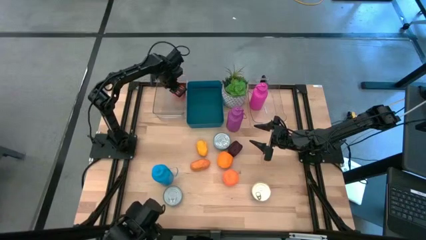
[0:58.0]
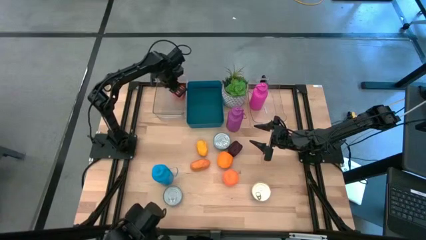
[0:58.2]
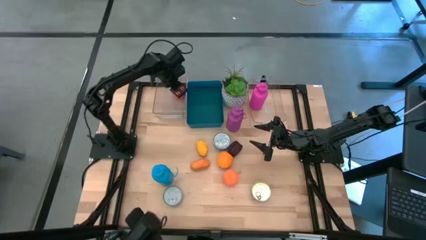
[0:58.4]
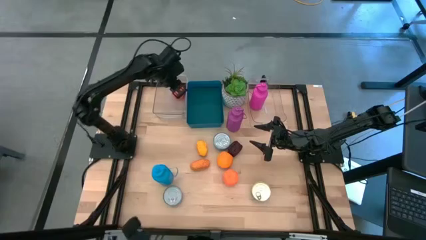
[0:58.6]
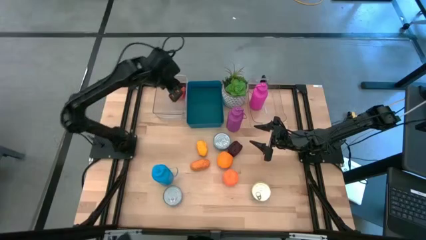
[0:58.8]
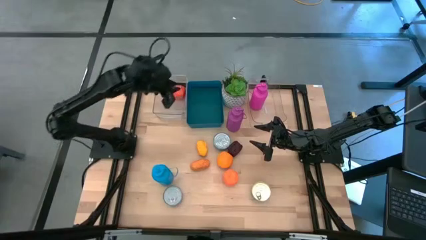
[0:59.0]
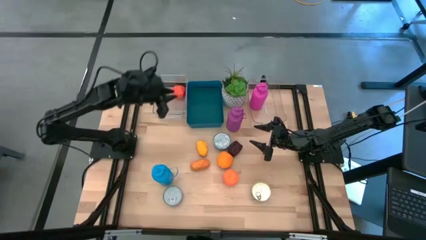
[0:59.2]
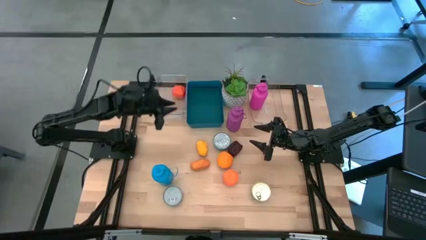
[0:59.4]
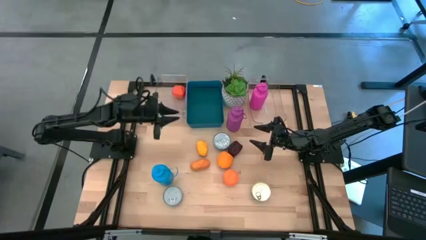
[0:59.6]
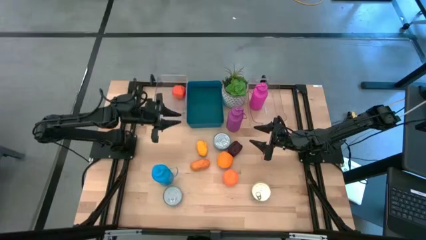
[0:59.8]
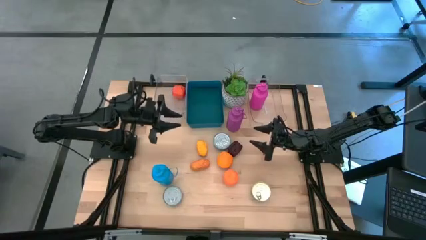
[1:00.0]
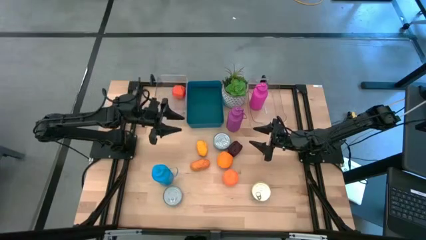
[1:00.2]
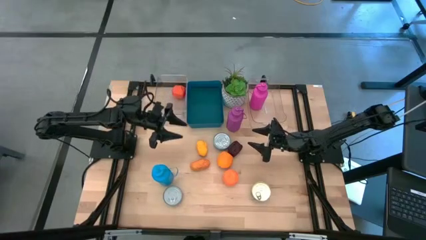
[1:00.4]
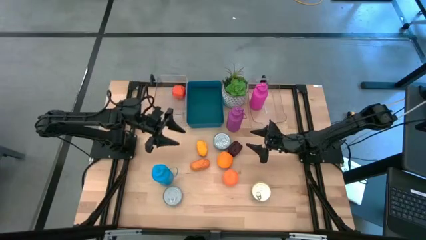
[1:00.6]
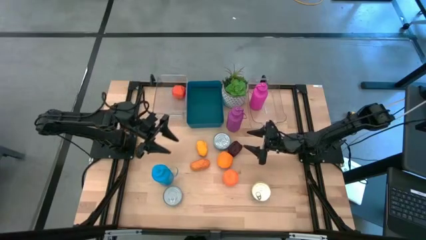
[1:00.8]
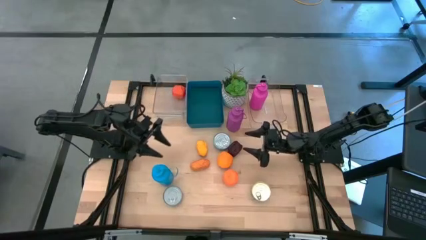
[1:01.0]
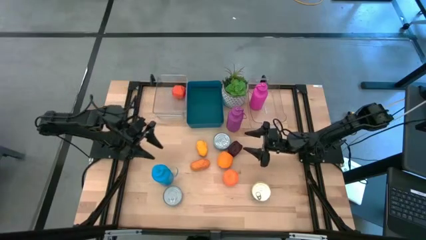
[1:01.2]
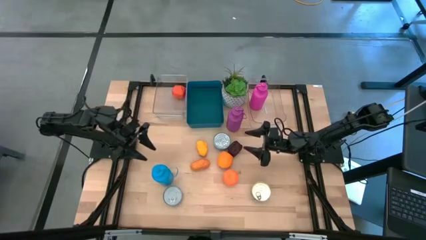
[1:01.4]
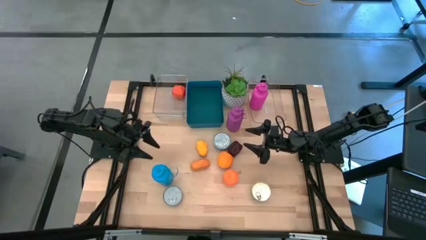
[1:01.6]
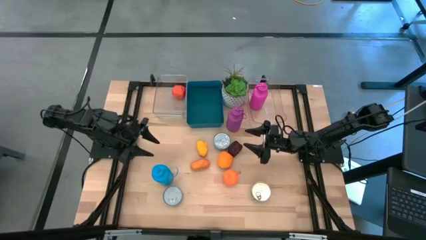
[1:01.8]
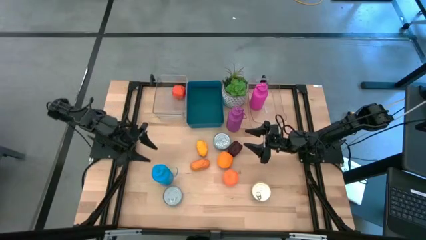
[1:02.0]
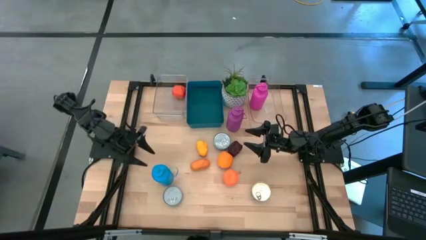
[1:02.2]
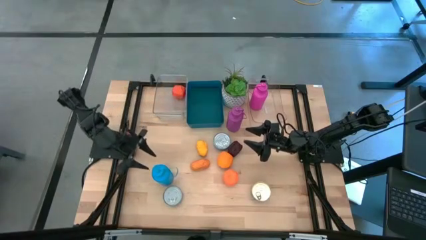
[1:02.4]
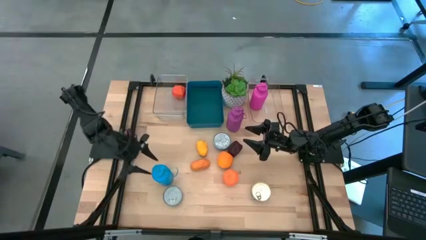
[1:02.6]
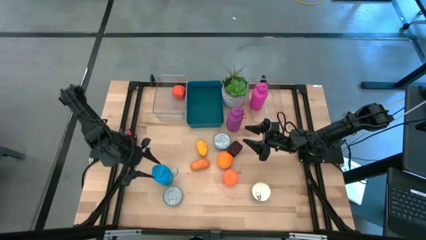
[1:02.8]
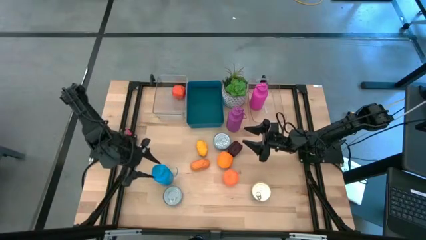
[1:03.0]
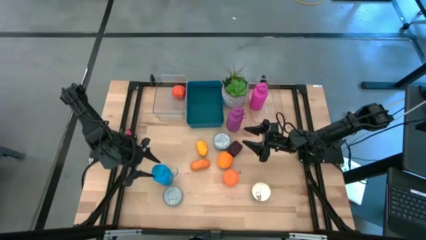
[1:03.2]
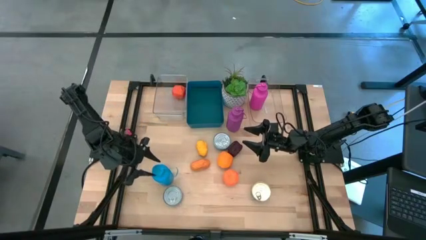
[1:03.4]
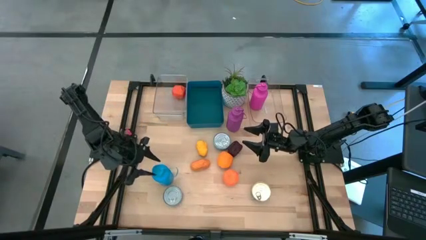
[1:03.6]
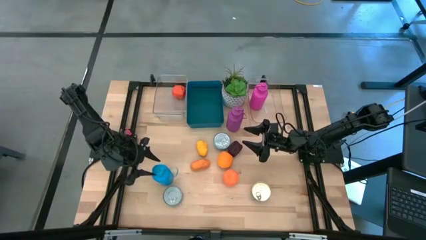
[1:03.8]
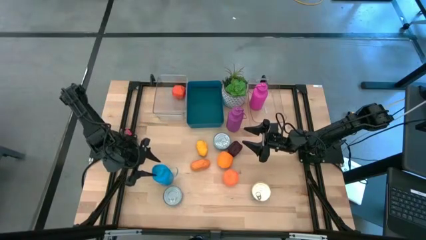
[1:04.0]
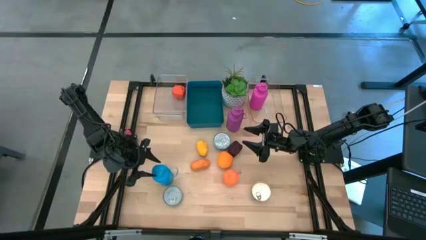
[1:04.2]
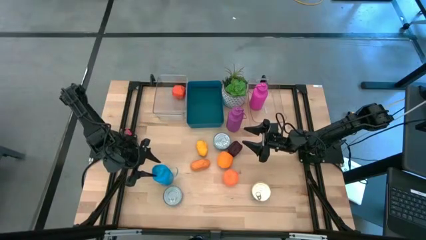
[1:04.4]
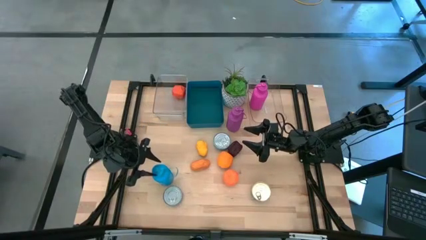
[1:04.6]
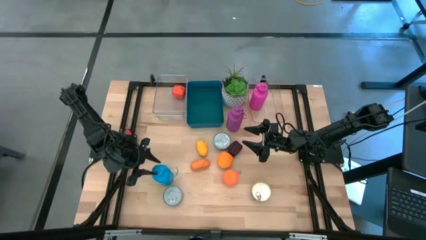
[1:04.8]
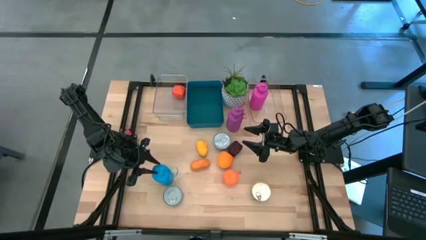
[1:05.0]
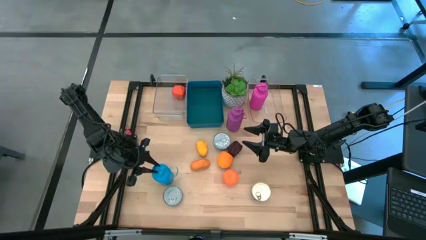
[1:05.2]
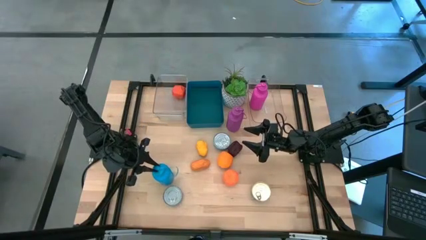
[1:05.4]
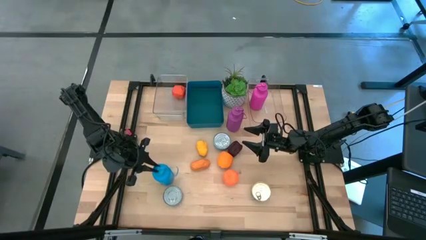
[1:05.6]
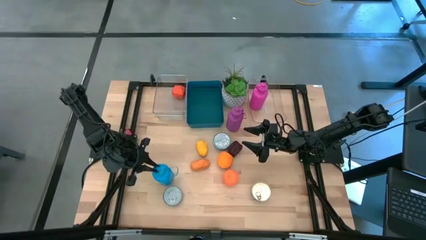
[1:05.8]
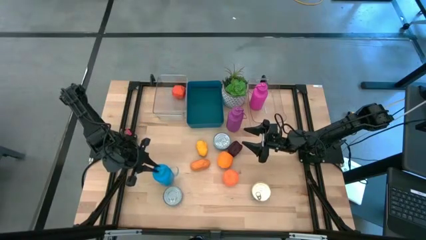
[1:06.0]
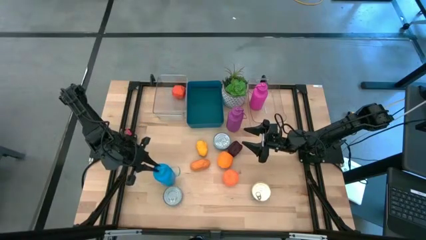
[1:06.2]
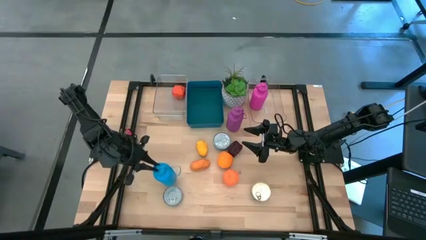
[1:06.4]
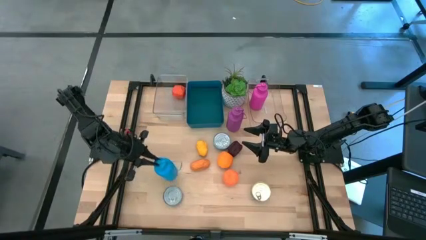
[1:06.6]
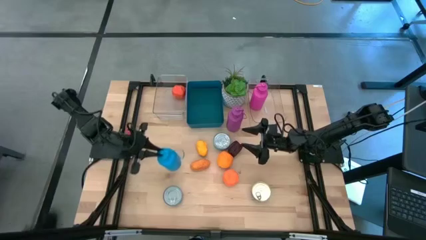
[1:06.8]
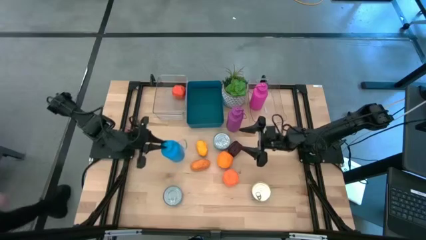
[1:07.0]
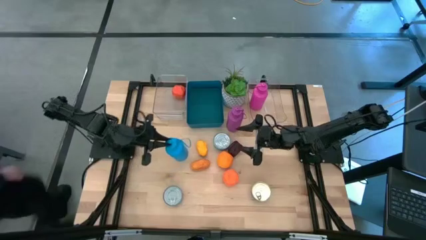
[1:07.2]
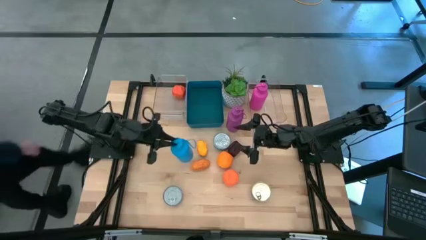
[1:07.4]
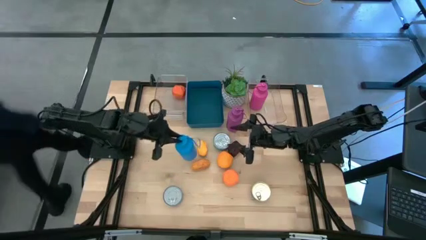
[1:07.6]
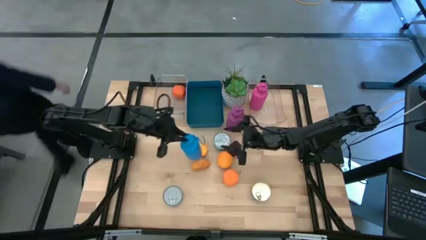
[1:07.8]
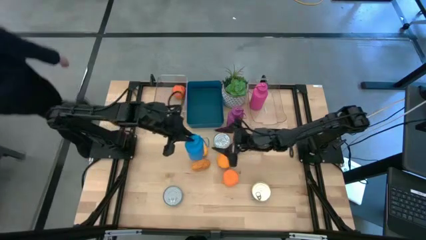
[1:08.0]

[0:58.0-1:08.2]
Task: Pick & Place Food Item
Put the blue tumbler into the right transparent bin

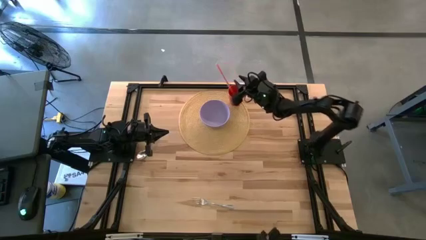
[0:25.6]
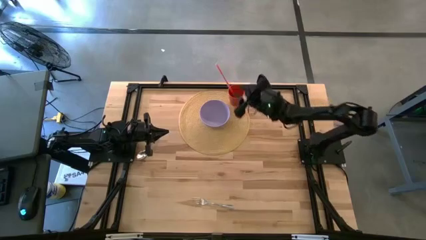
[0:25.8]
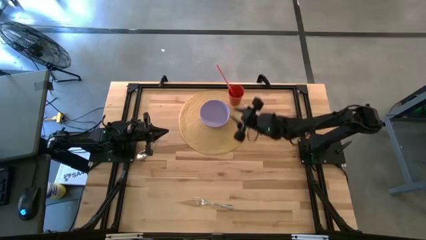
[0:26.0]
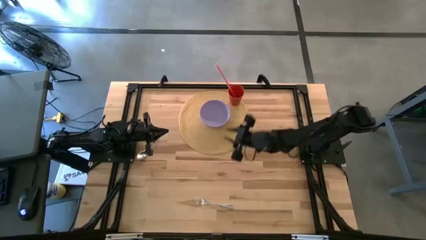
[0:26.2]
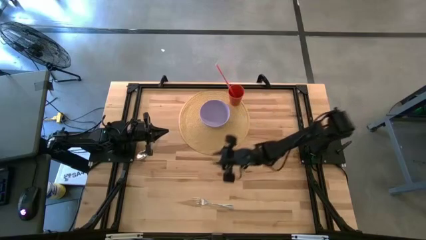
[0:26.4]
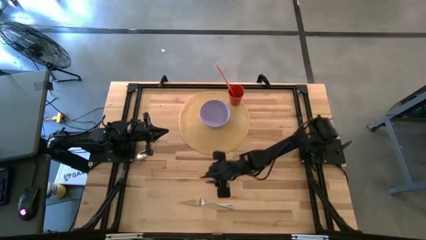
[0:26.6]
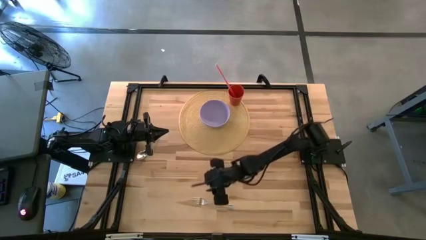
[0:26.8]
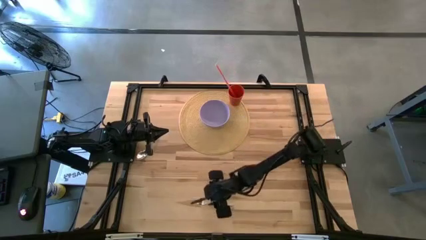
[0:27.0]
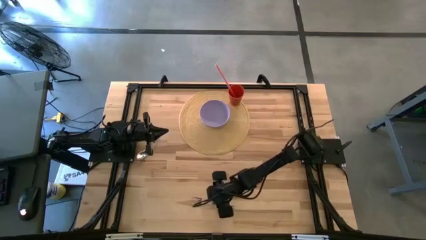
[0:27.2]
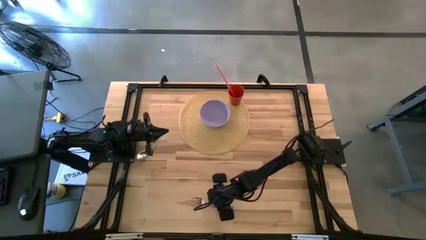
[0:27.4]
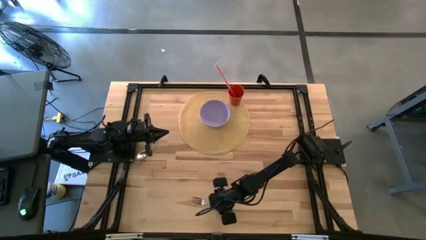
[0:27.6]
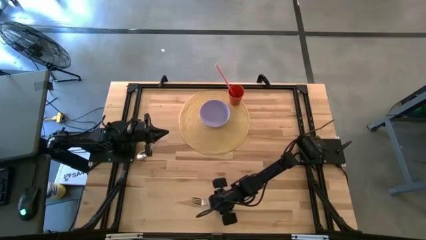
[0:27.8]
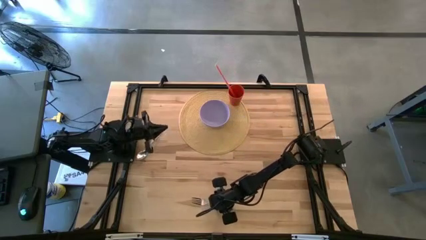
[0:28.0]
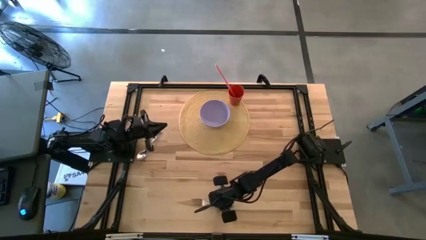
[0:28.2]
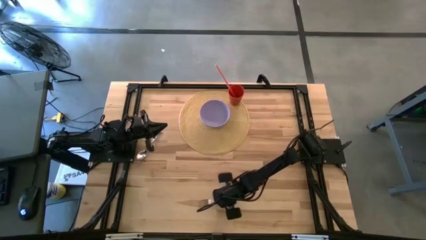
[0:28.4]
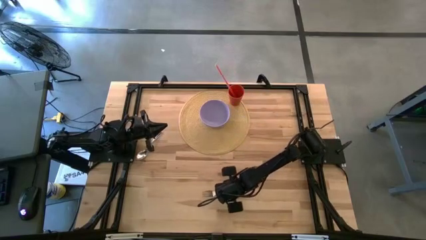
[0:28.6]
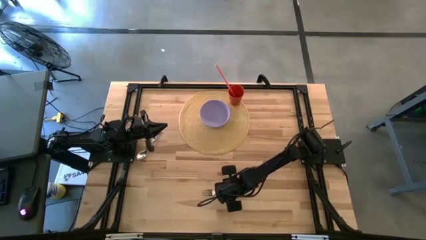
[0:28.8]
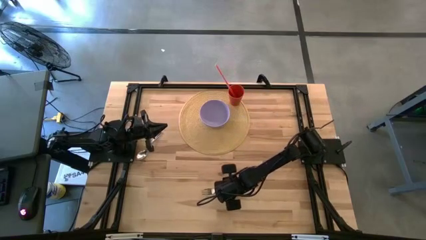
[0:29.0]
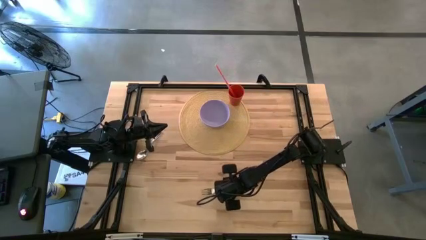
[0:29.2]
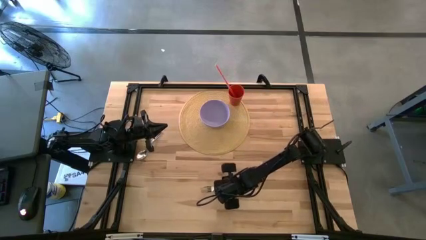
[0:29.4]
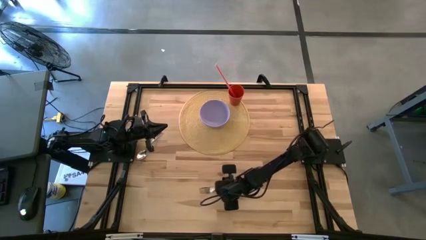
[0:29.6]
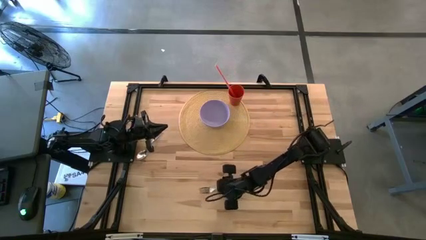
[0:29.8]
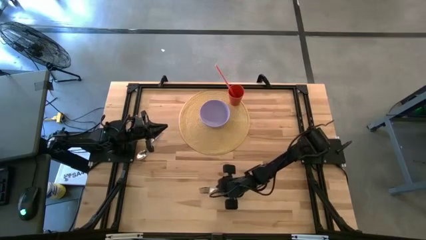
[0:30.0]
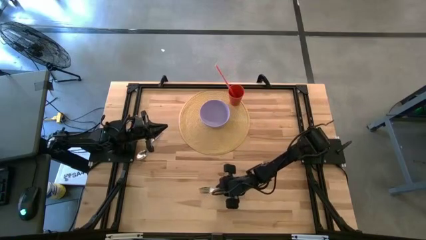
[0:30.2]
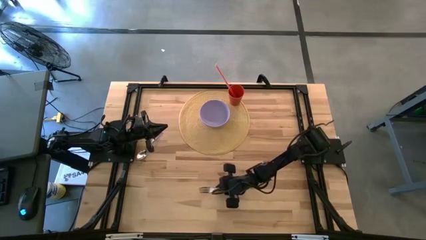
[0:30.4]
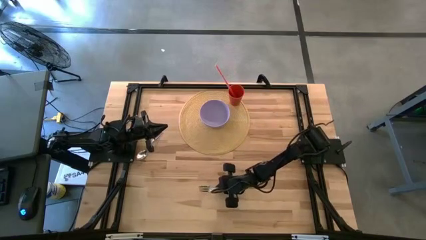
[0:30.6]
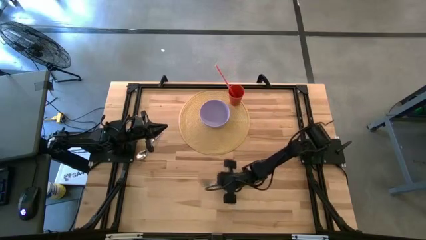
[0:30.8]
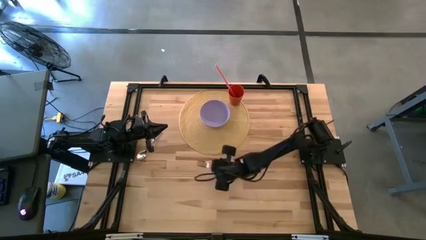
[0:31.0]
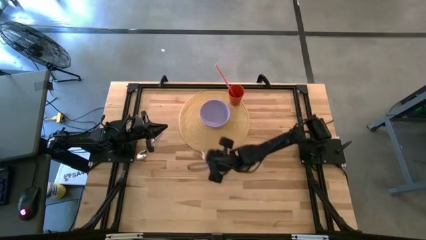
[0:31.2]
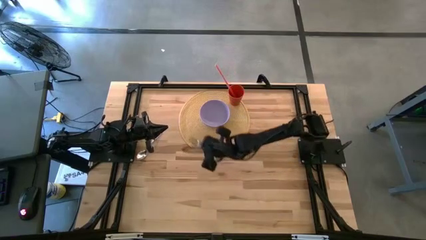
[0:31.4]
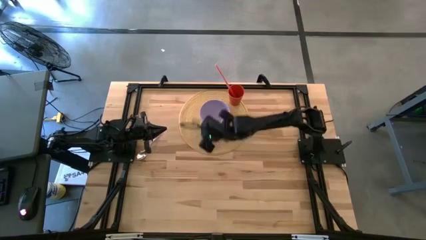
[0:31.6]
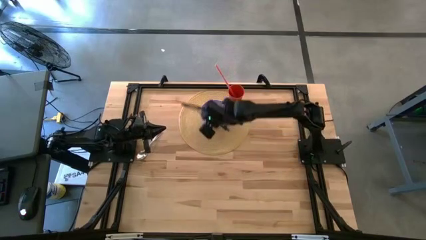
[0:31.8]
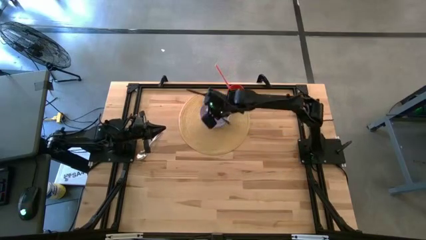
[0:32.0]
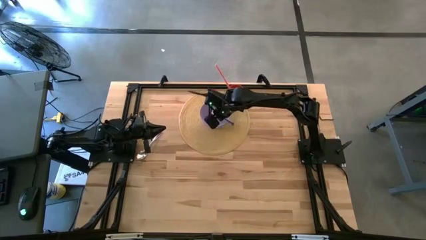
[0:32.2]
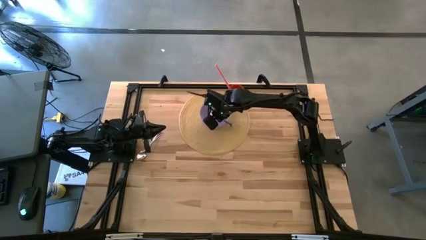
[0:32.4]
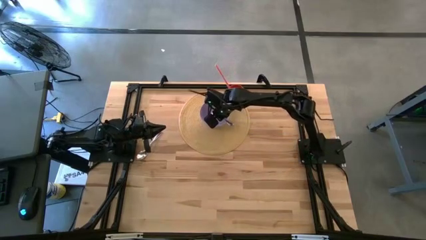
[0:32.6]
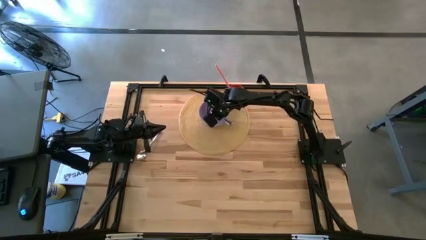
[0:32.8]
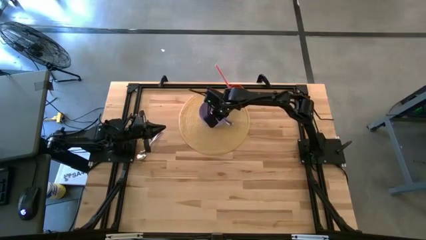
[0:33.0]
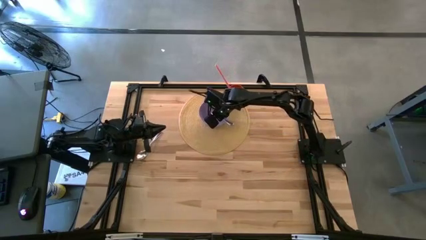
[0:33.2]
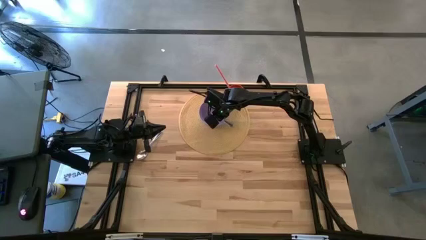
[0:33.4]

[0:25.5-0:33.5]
Task: Pick & Place Utensil
Put the silver fork into the purple bowl
